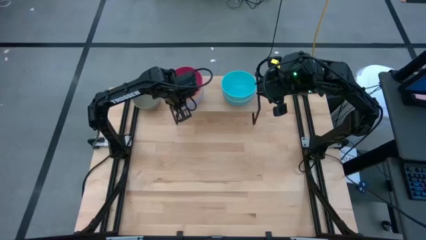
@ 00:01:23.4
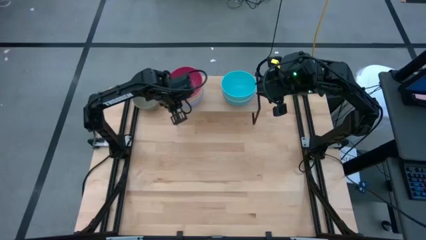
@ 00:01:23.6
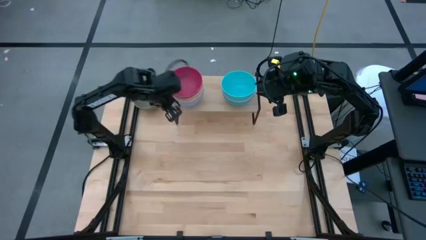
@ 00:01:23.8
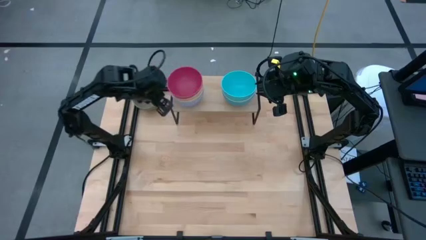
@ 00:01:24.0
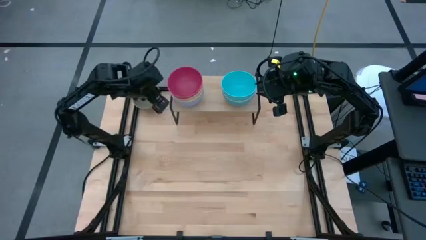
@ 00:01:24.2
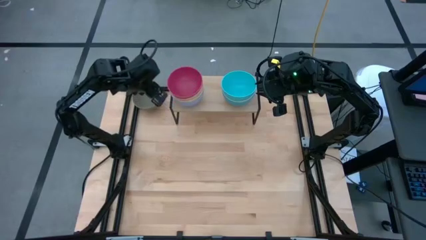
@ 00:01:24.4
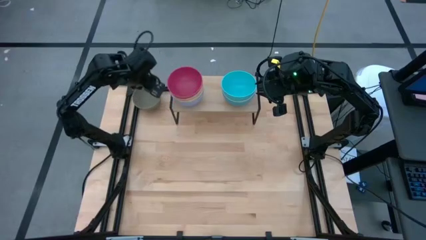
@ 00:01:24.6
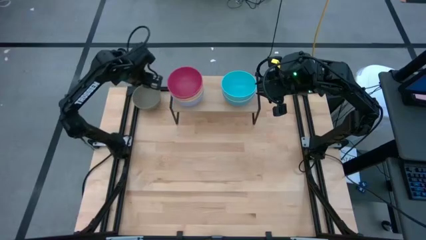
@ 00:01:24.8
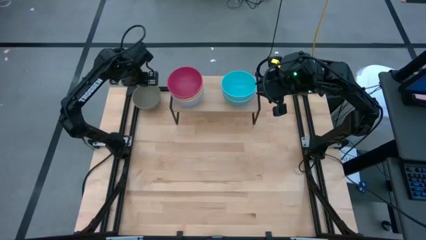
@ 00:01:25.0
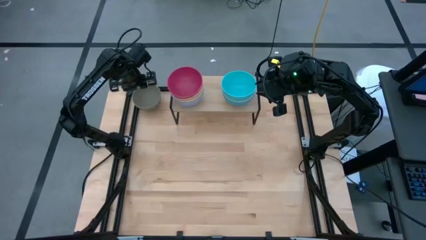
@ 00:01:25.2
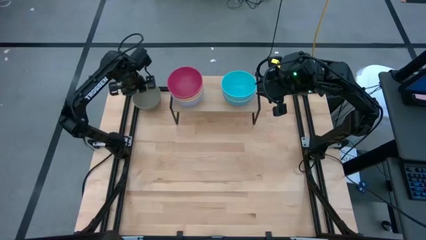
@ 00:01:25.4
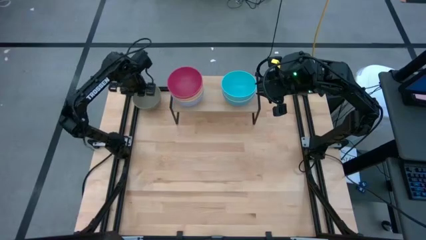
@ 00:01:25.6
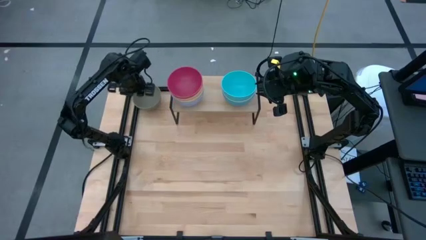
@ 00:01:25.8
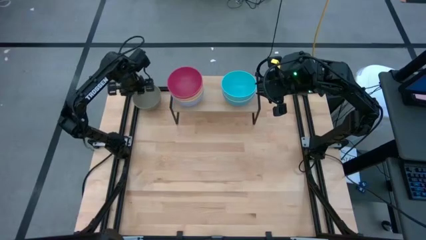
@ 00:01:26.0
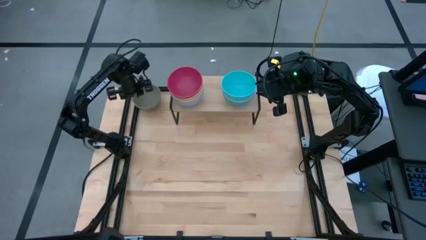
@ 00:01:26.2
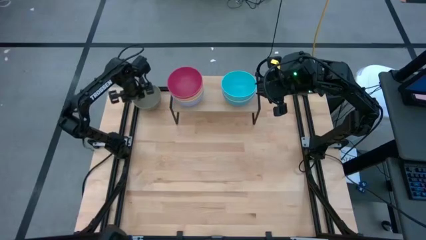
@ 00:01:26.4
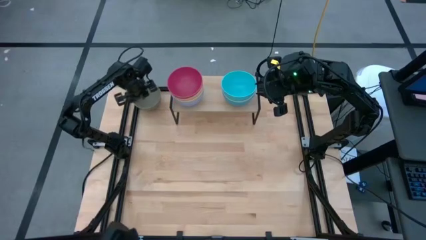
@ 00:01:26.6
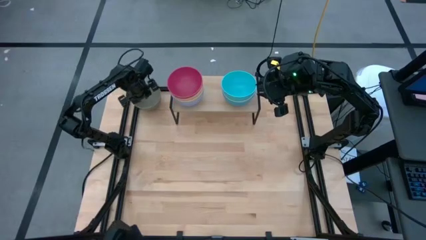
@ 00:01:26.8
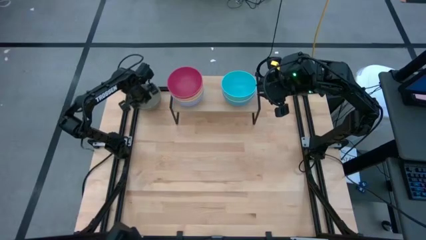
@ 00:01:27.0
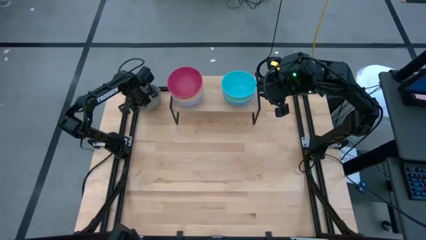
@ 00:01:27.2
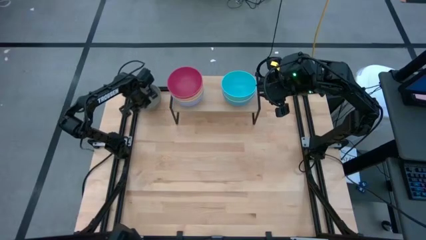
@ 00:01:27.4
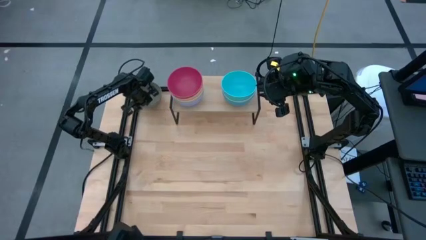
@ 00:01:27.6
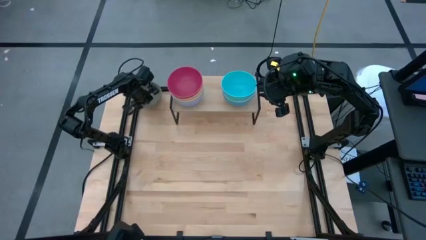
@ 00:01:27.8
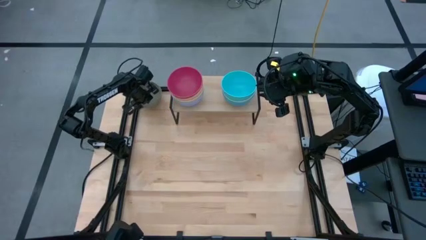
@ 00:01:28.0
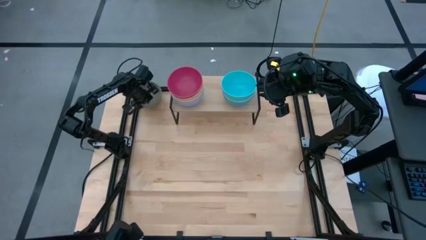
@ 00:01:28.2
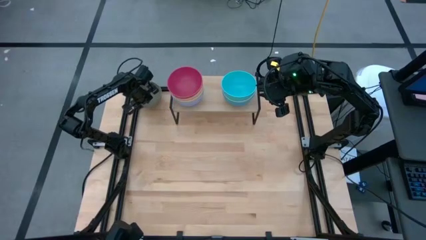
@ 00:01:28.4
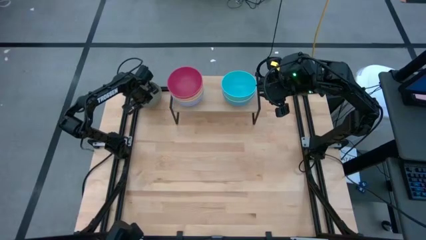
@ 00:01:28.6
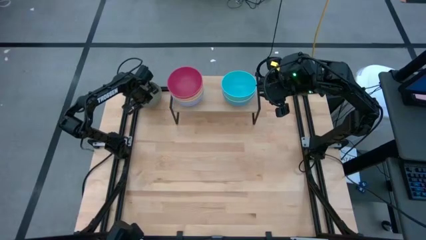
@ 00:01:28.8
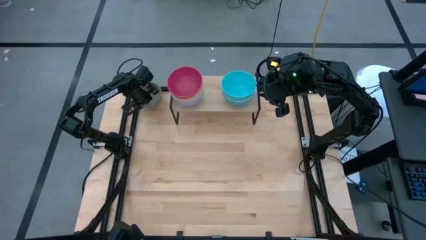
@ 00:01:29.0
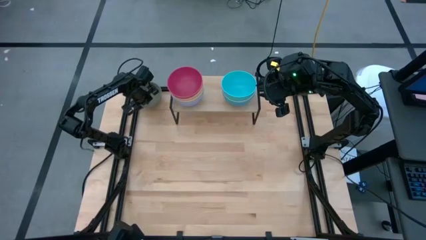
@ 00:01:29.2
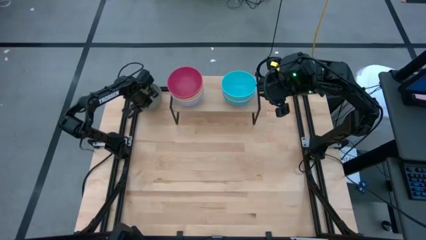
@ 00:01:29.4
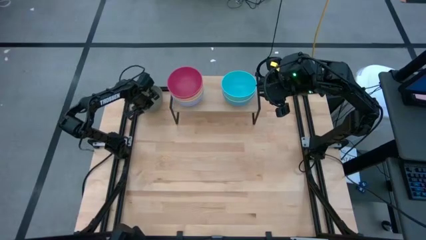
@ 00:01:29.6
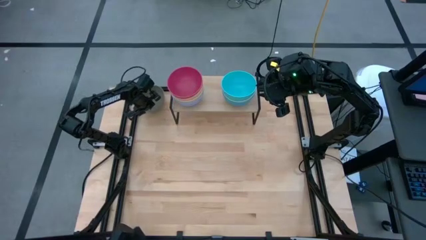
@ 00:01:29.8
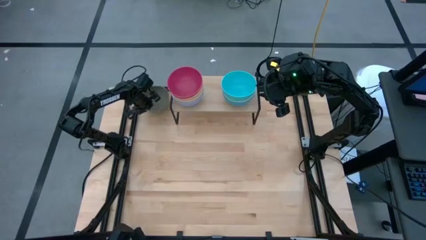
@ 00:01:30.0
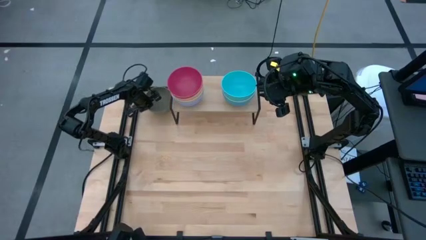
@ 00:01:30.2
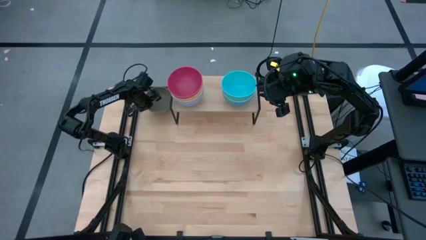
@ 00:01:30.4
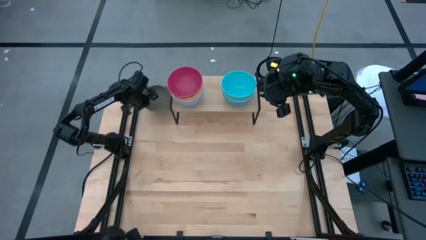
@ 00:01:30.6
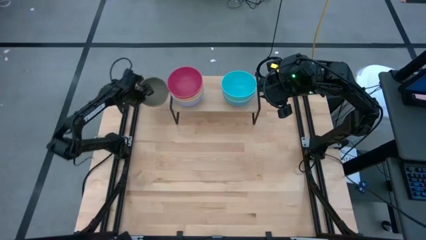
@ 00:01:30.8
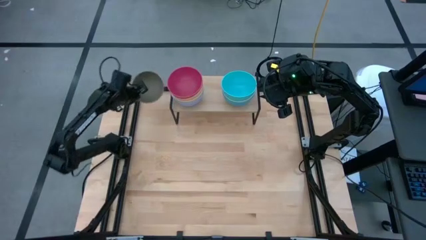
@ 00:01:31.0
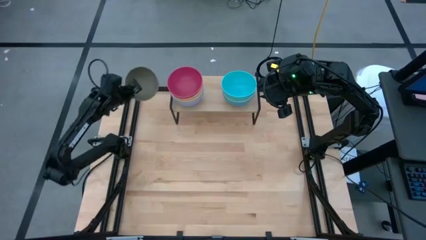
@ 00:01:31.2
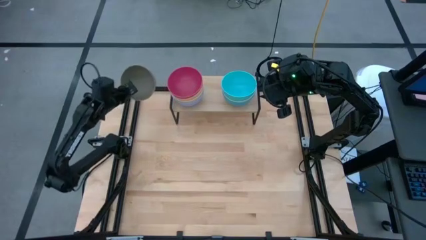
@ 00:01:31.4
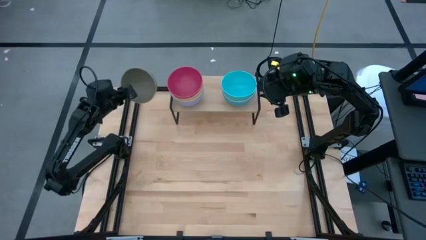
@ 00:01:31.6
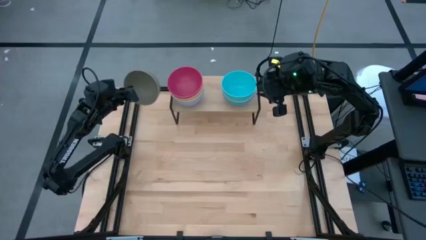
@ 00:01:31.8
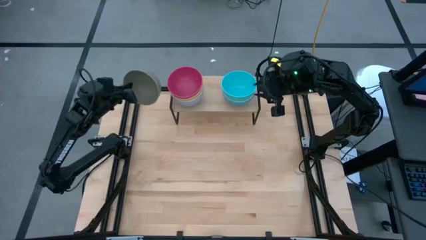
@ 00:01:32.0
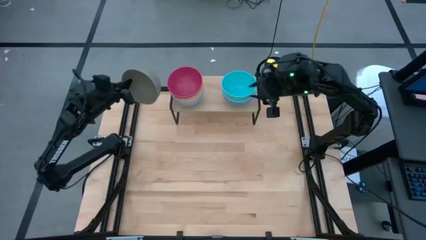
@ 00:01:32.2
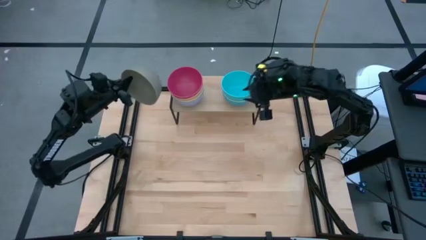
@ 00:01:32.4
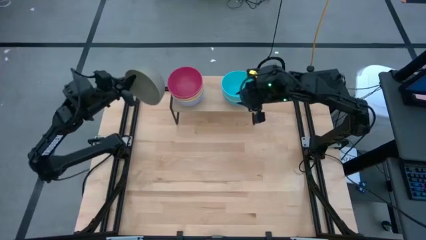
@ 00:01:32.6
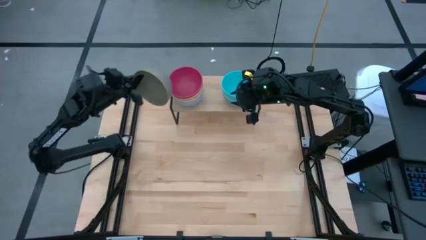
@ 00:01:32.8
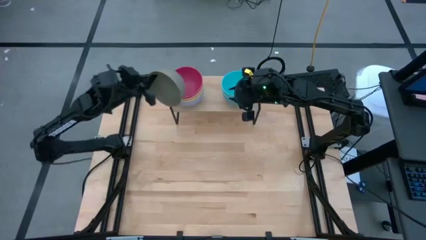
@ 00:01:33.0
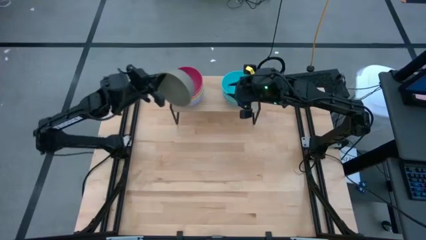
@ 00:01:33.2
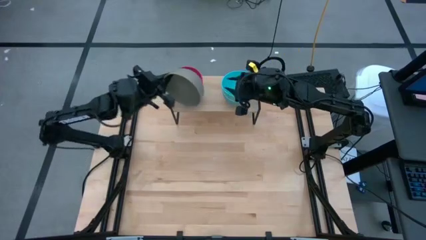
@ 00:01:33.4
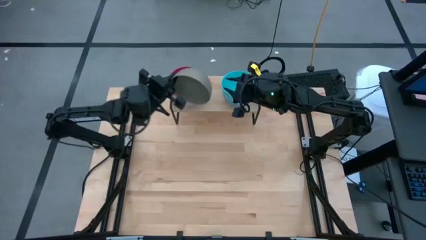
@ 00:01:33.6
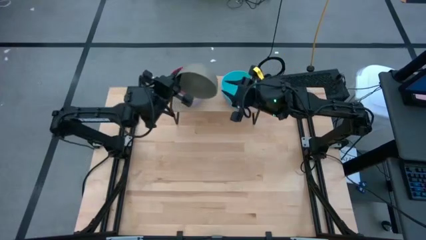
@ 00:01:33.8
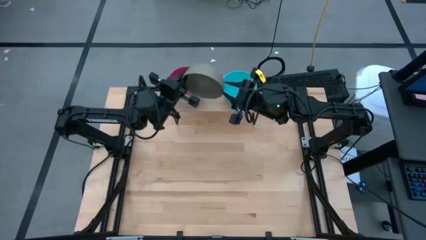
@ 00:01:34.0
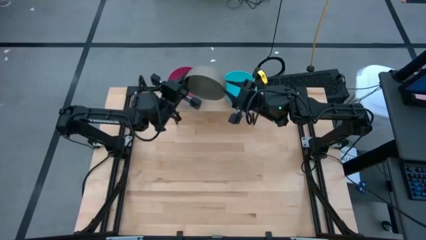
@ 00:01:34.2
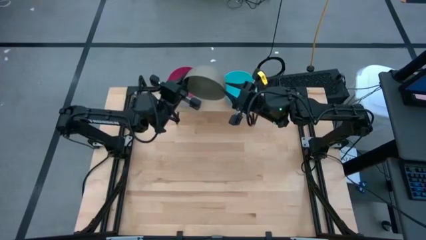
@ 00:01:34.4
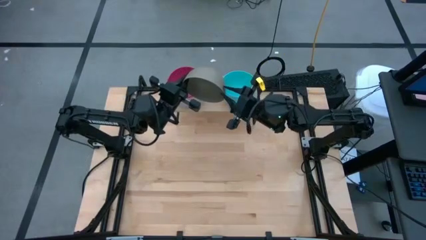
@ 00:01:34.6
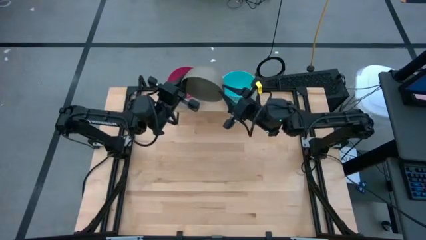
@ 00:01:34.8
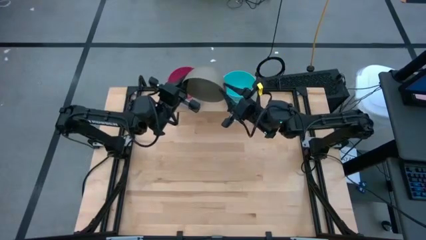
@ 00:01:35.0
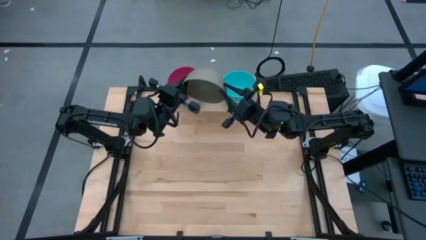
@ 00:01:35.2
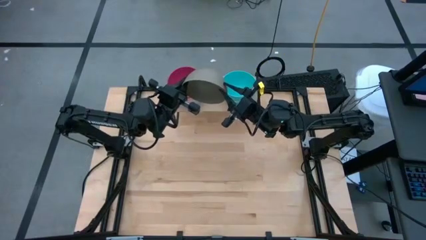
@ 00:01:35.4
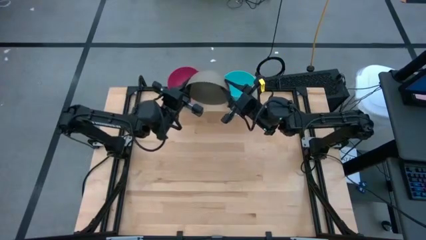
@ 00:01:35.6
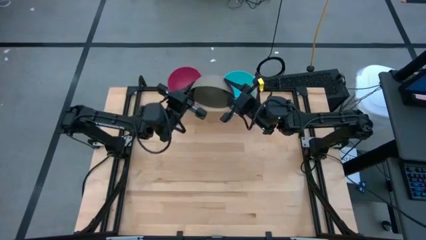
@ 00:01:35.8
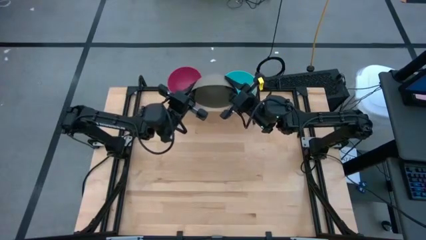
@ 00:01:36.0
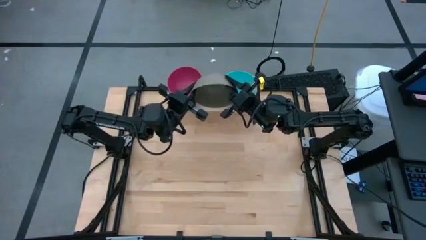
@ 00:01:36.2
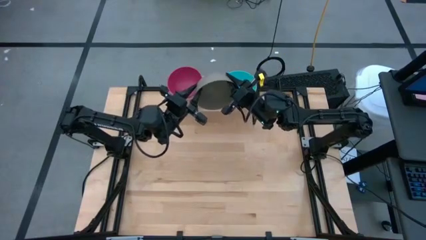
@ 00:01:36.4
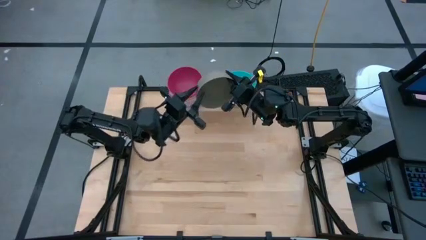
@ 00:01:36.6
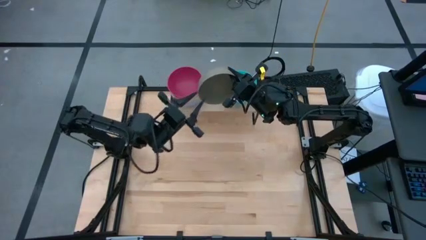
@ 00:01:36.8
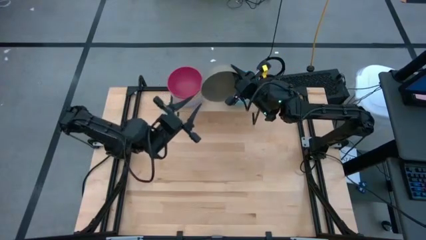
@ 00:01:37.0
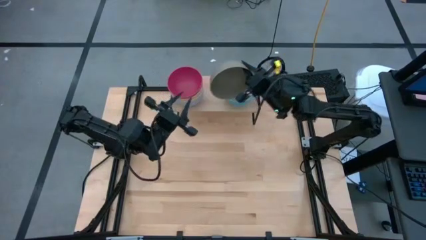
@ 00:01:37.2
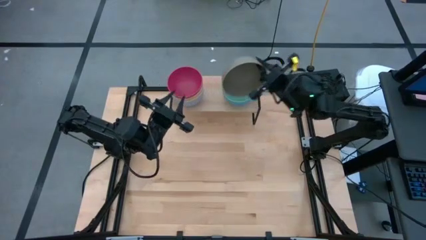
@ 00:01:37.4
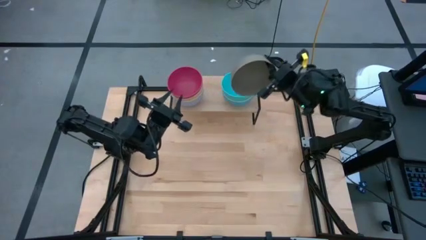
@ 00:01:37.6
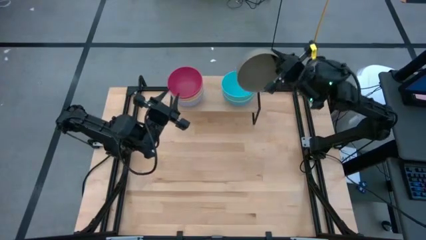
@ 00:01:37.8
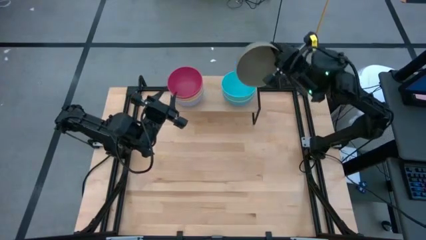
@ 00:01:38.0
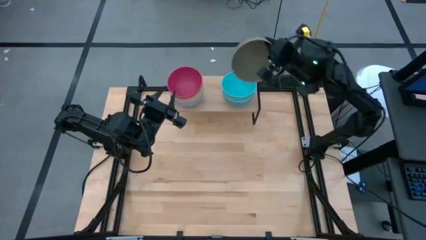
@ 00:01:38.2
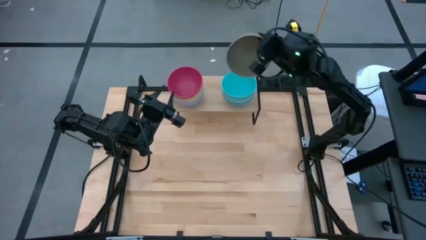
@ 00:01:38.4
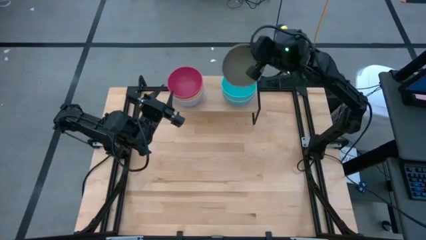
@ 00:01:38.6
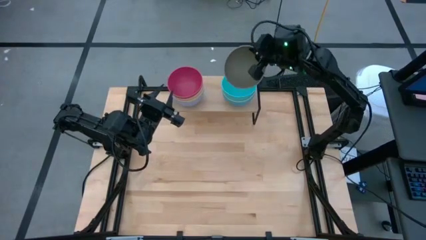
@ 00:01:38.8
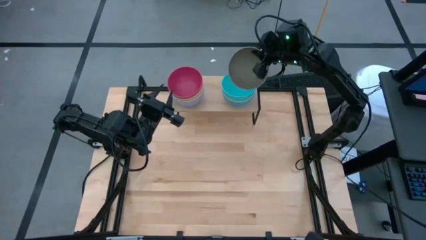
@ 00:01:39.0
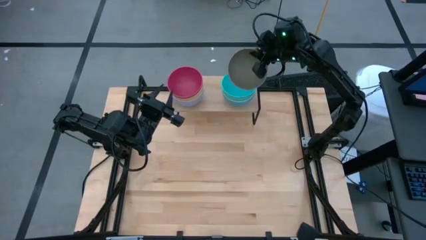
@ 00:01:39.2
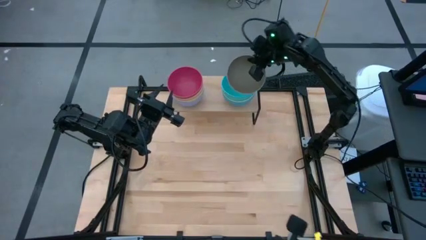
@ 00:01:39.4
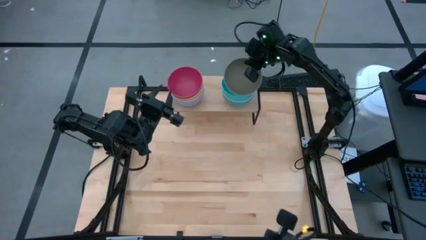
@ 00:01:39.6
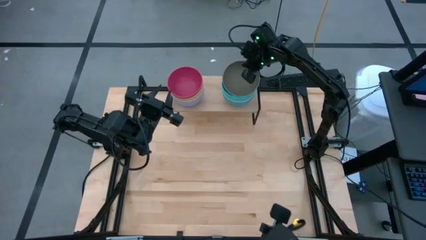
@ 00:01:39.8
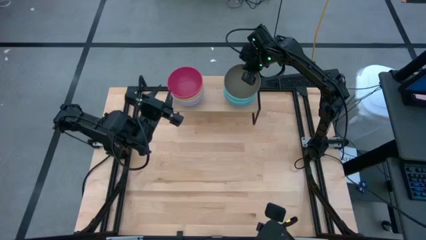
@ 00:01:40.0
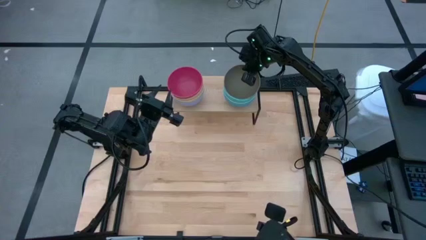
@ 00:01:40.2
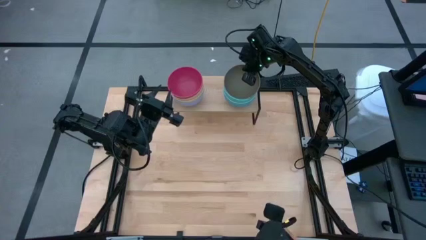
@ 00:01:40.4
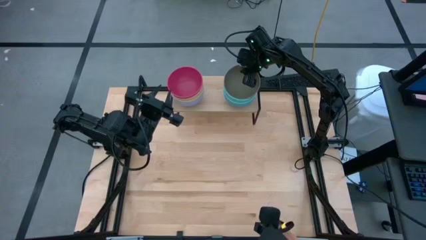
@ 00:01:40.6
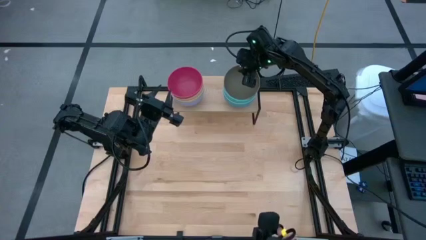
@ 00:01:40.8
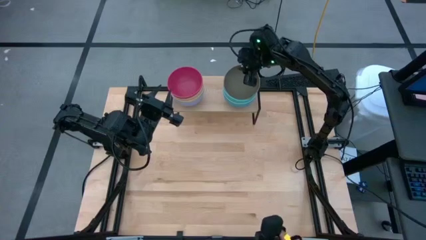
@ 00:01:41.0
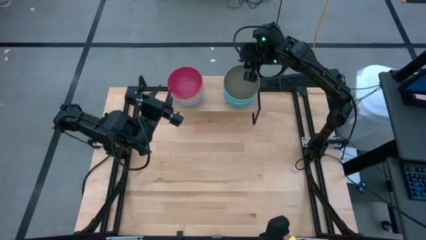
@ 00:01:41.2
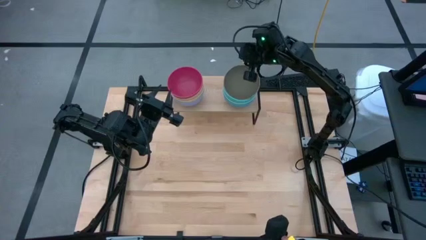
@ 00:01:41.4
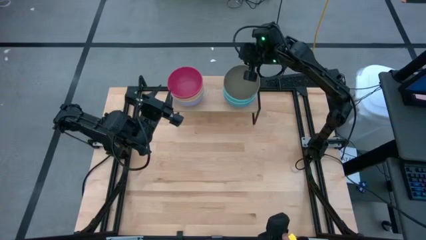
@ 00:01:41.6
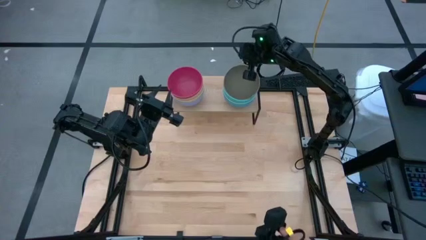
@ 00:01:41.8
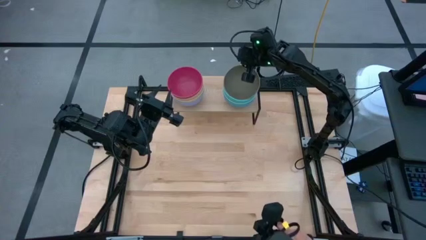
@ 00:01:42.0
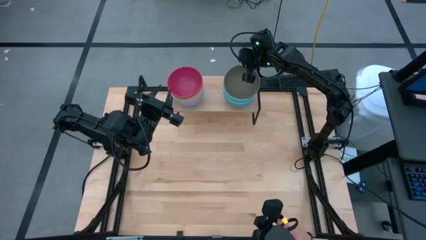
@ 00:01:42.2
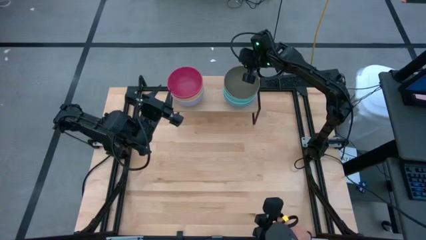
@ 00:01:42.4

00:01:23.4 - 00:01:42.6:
Task: Place and stack bowls onto a shelf
Stack the dark brown bowl on top of the sky blue bowl on the shelf
